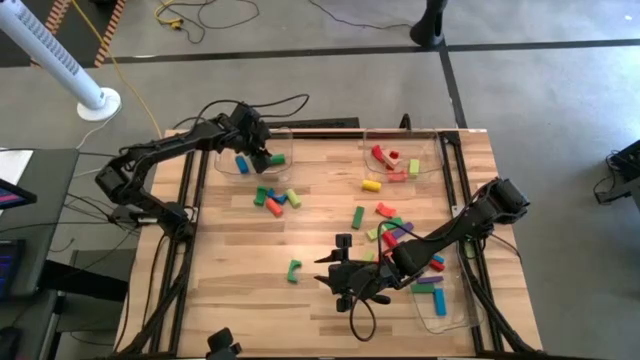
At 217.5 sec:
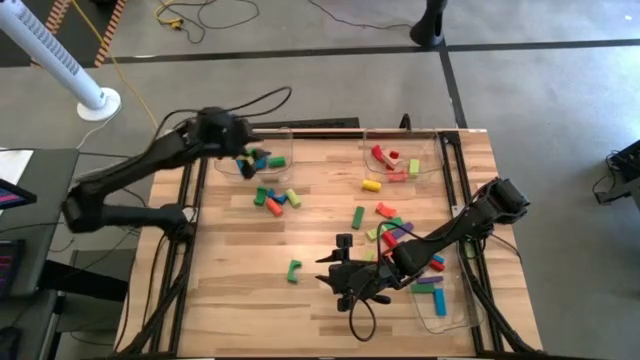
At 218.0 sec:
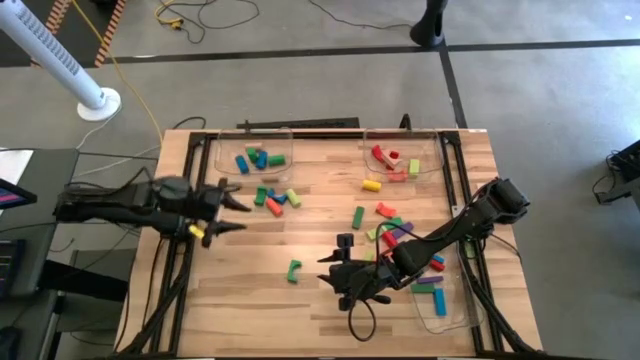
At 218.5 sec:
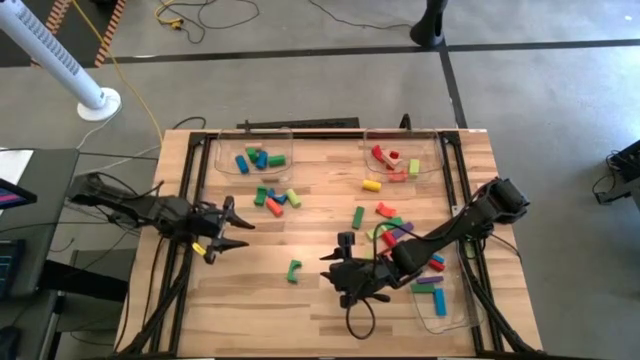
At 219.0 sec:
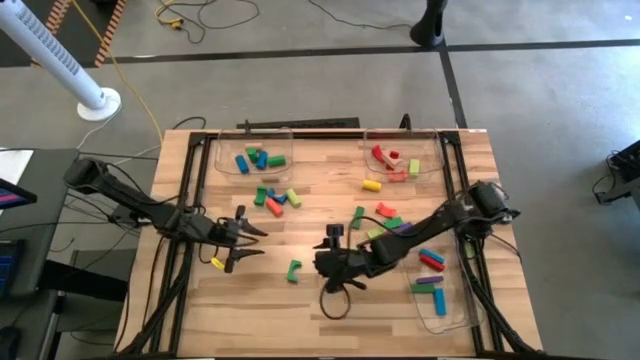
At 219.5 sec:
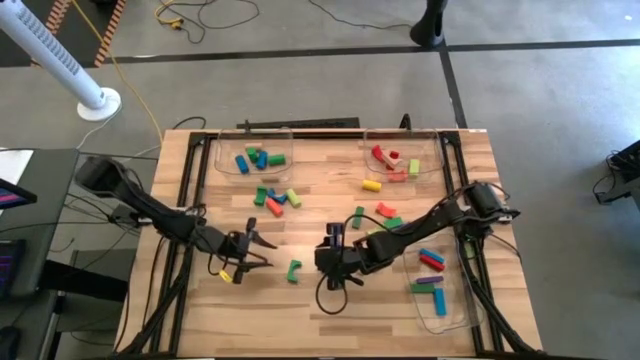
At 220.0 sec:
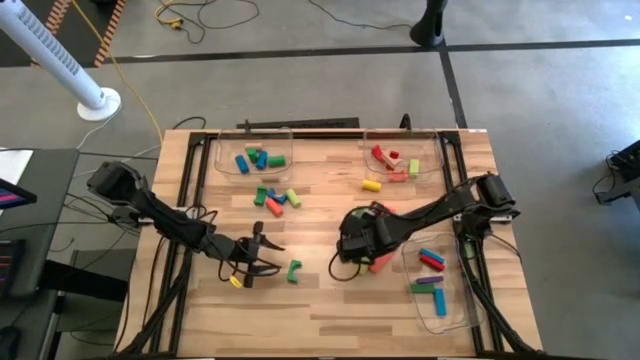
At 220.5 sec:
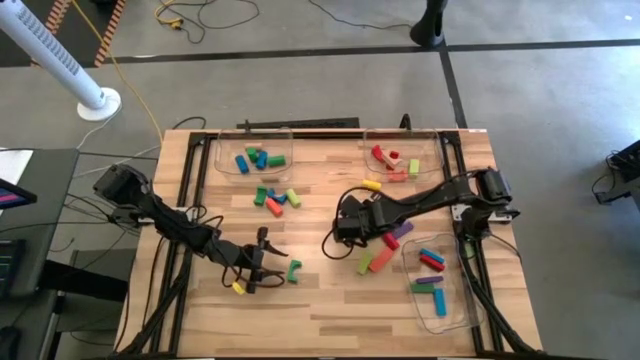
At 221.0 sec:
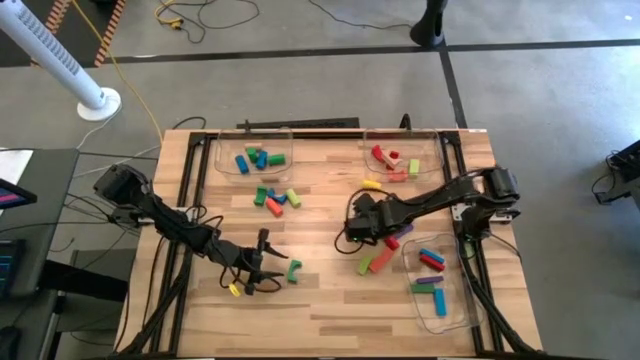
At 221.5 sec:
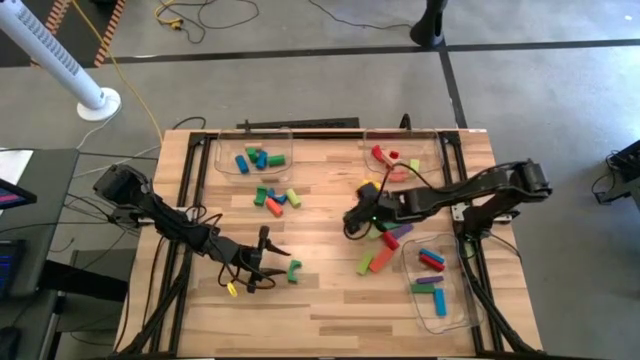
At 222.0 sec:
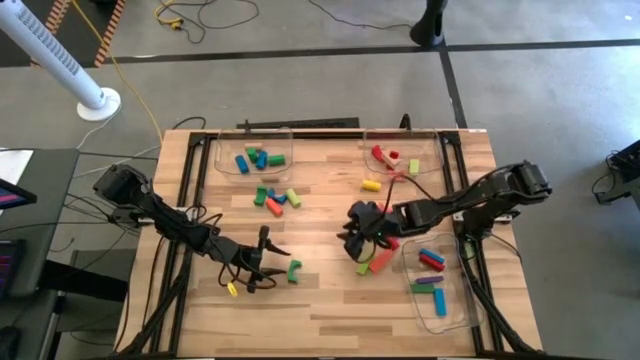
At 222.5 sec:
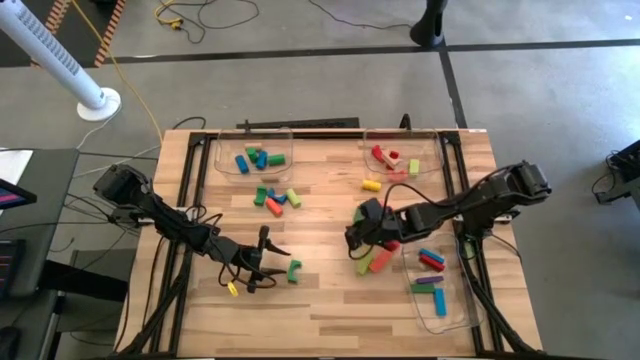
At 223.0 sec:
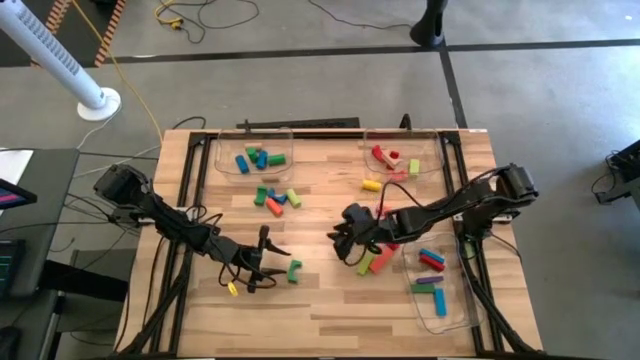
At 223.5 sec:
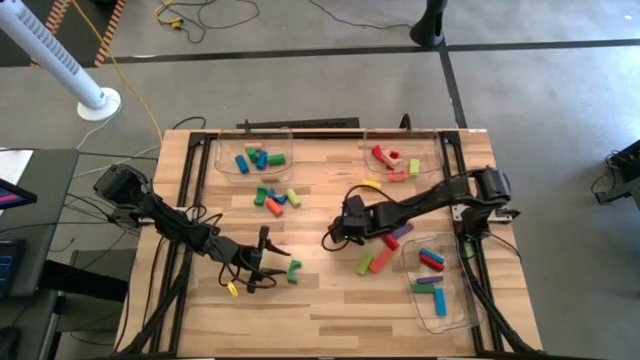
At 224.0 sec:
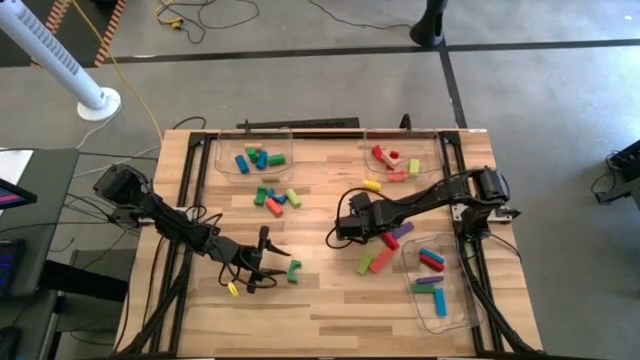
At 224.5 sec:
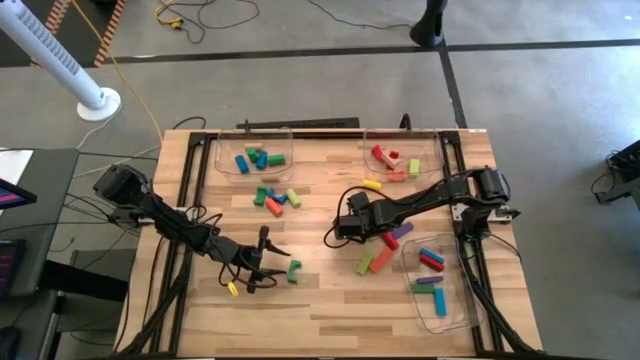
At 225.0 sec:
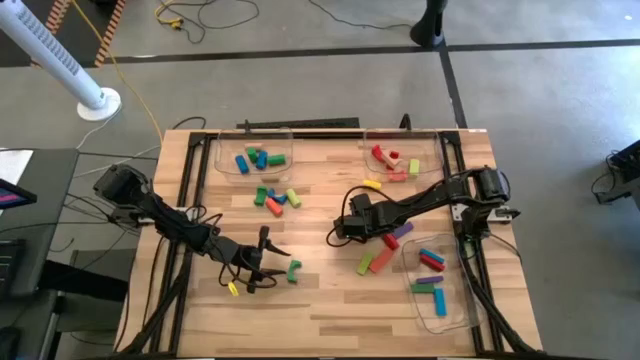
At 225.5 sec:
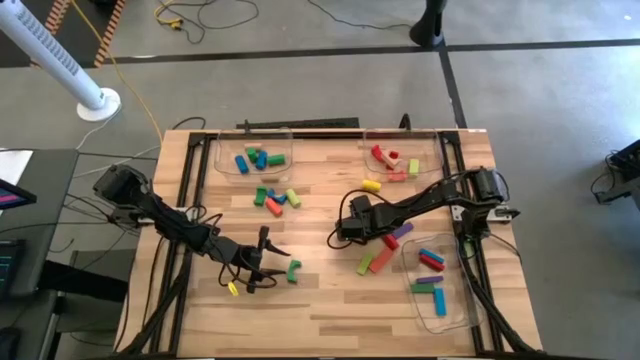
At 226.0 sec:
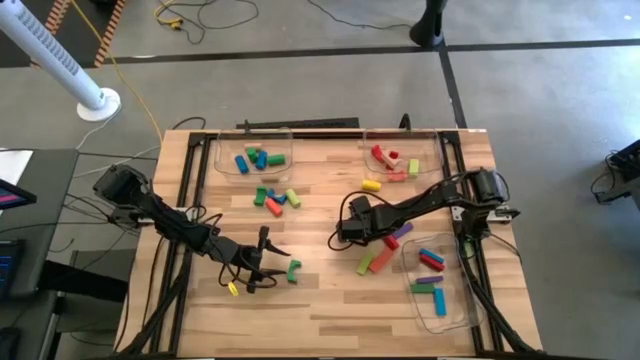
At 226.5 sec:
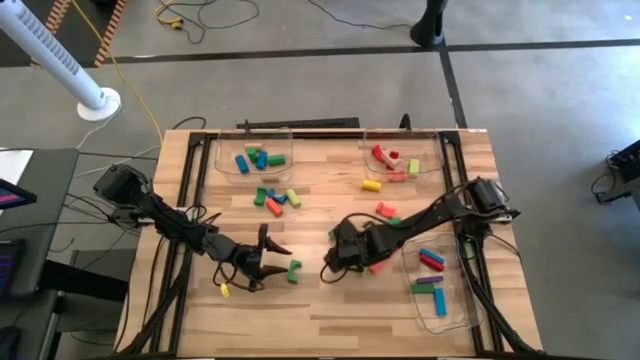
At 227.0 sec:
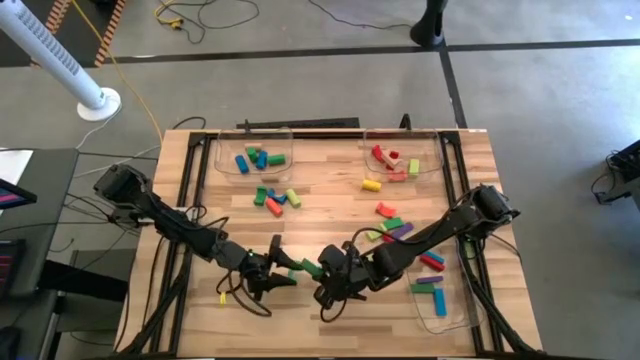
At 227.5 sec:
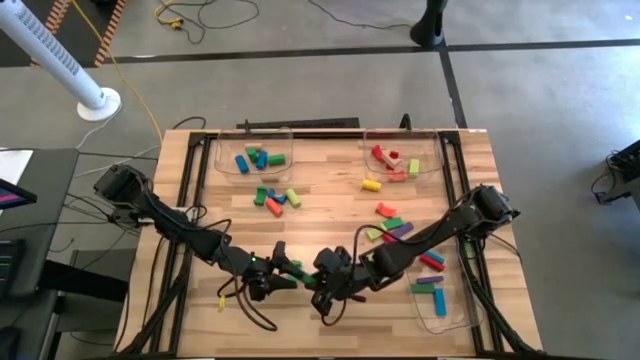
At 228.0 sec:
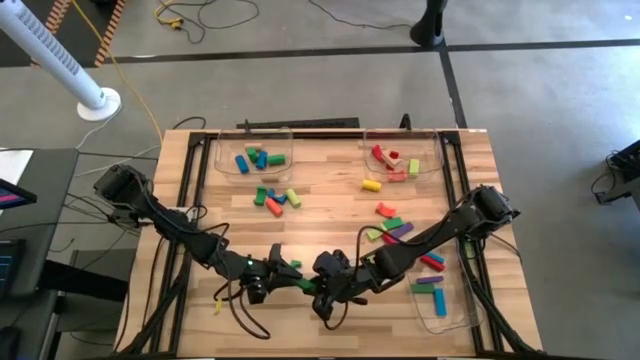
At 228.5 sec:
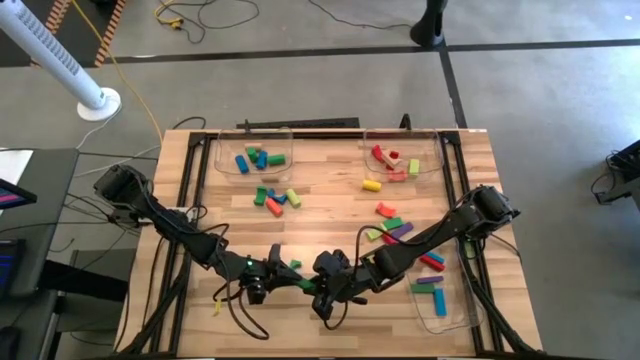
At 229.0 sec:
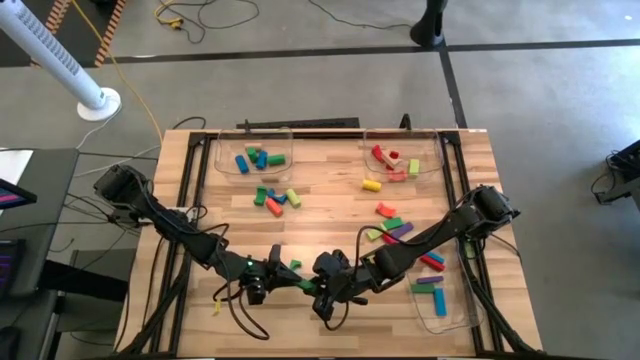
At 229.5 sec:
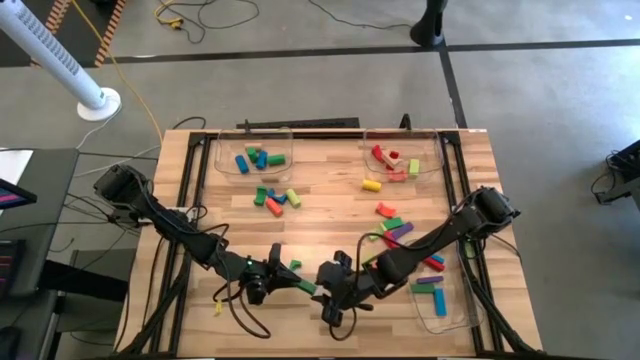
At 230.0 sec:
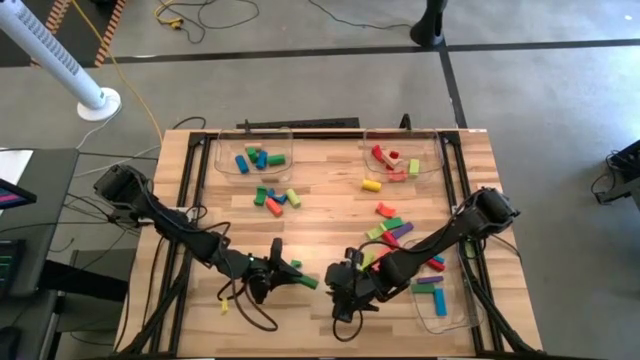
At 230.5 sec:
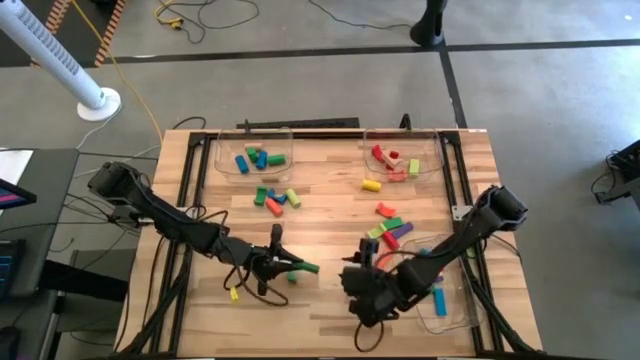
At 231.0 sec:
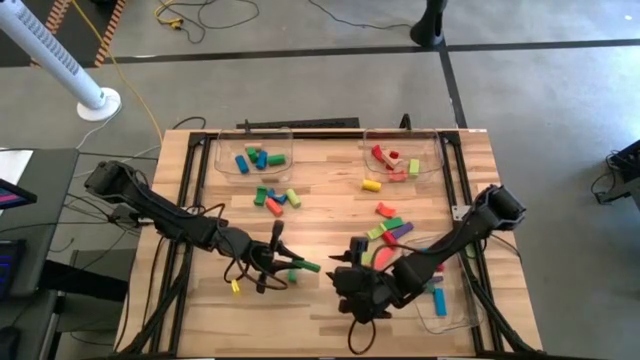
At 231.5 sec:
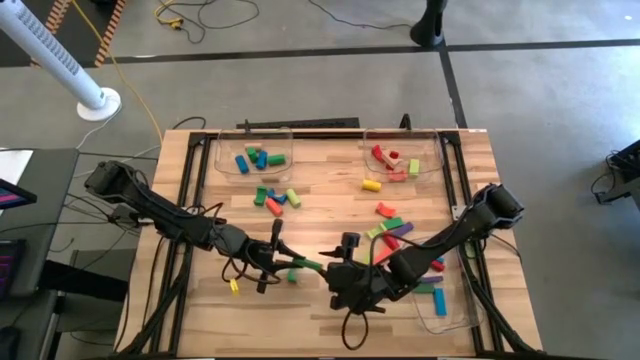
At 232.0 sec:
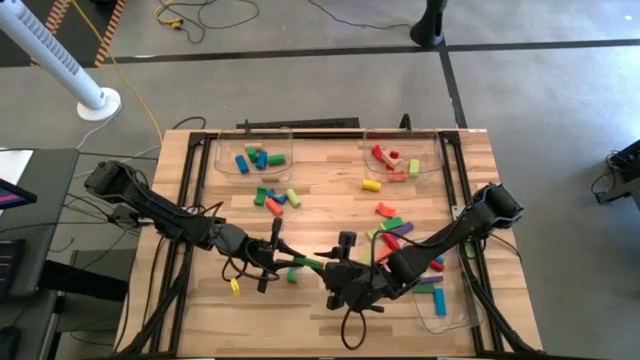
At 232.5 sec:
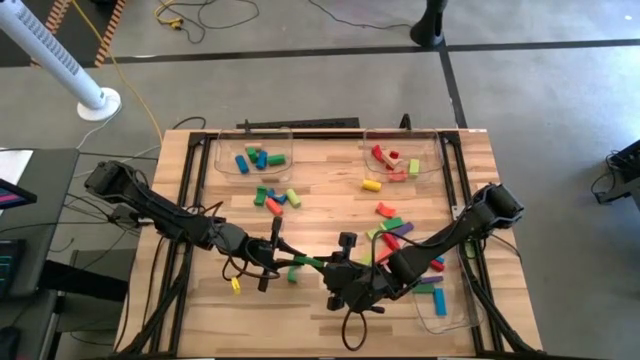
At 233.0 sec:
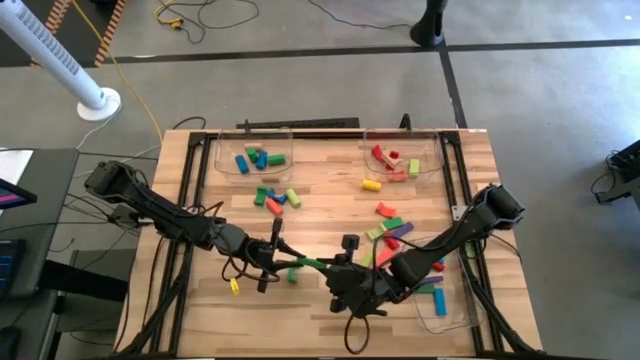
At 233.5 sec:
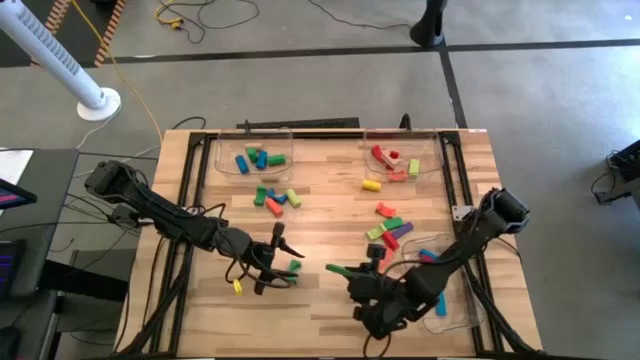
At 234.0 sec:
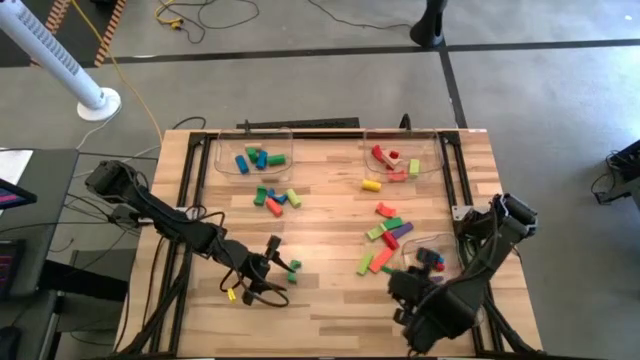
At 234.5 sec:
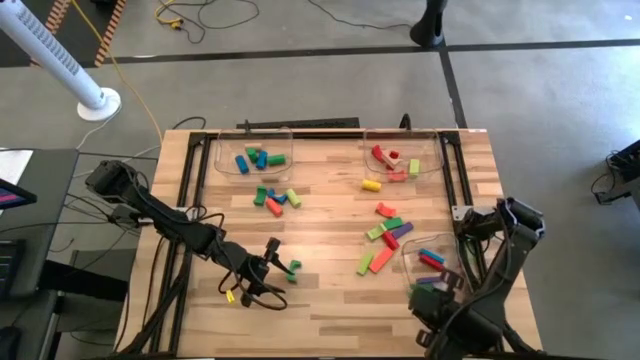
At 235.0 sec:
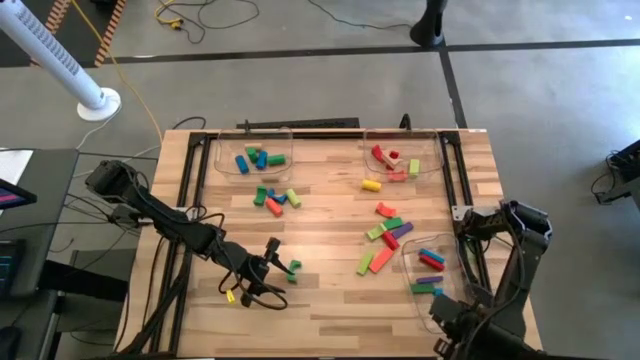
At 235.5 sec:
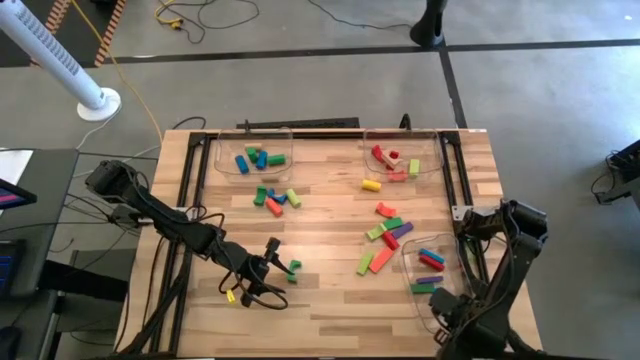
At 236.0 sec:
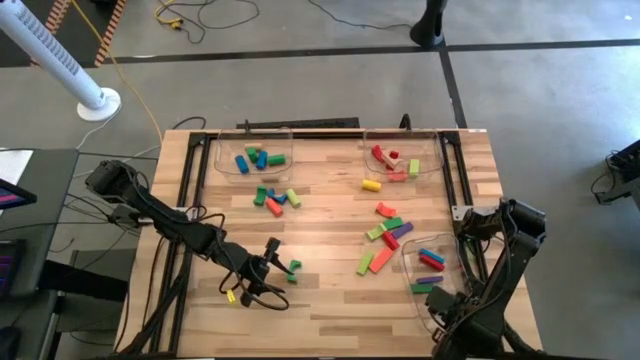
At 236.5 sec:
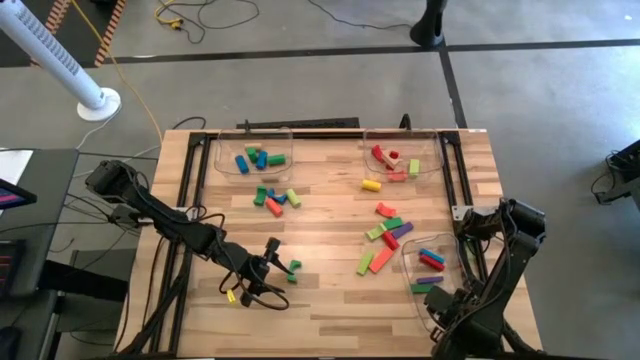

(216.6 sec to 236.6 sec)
Task: Sort blocks by size
Put the green rectangular block into the bottom transparent bin

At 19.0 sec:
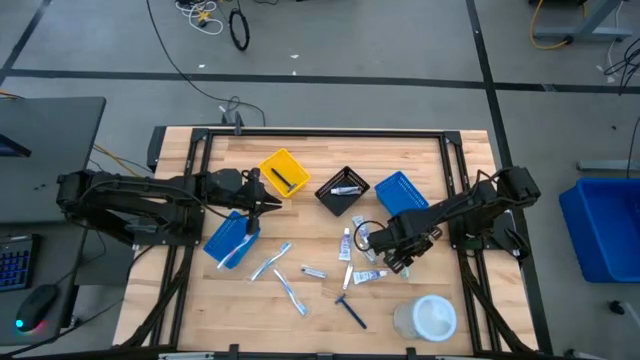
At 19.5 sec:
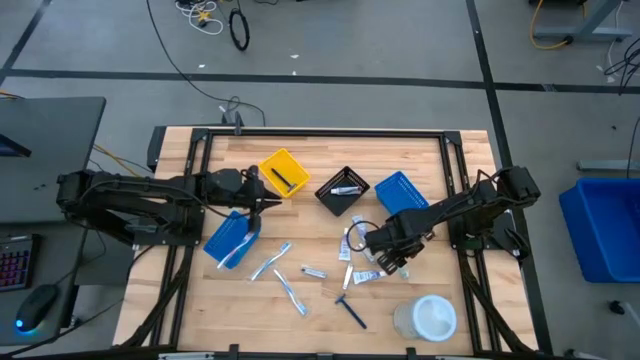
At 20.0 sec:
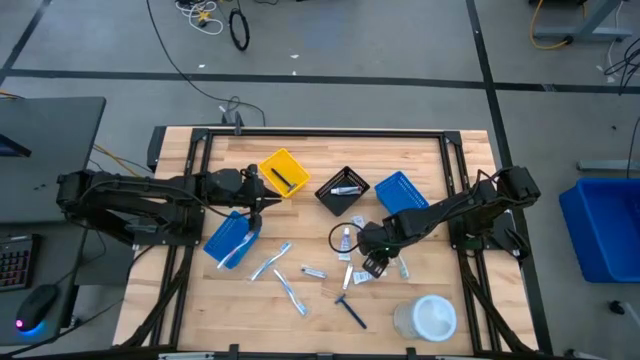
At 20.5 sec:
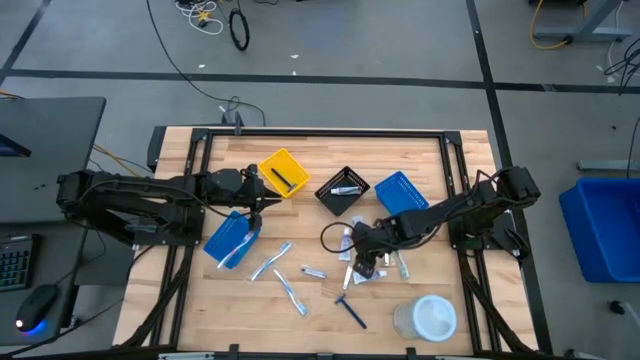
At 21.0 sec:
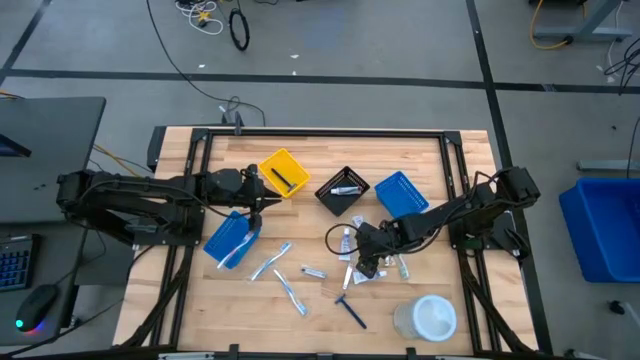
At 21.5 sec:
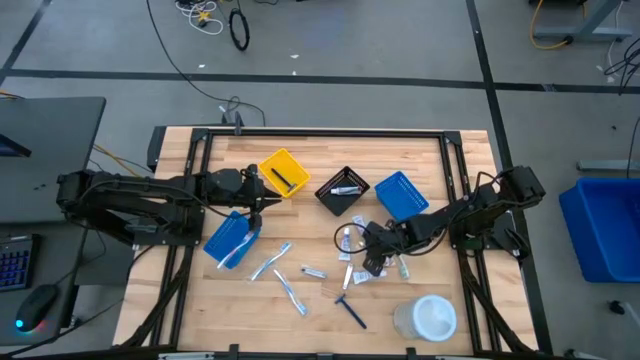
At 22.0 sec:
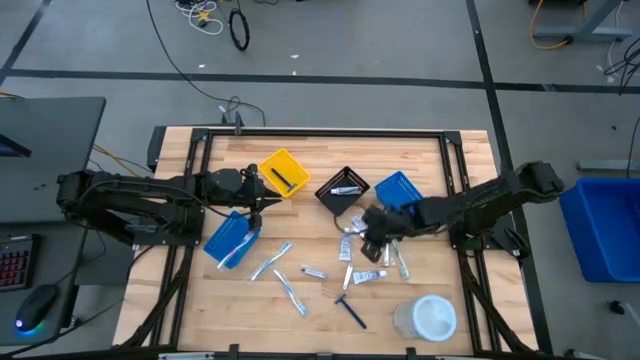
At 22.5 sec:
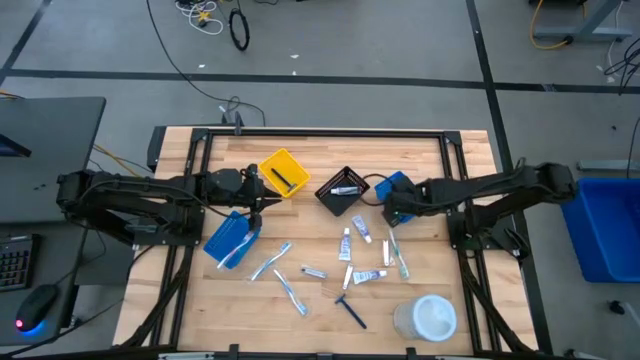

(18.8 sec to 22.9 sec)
Task: Pick & Place Travel size toiletries
Put the silver nail cutter into the right blue bin
